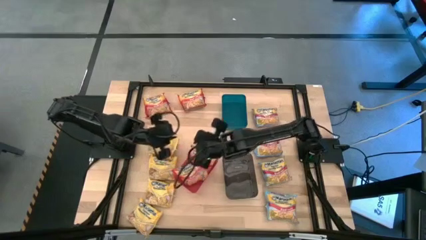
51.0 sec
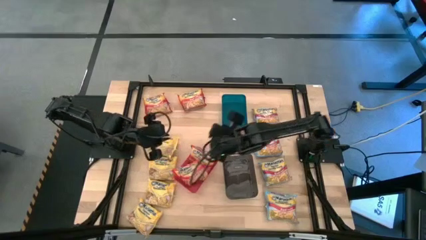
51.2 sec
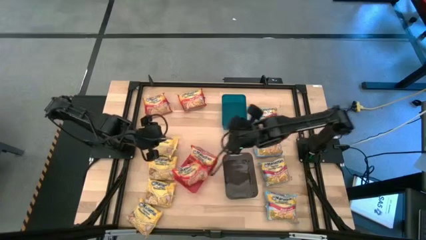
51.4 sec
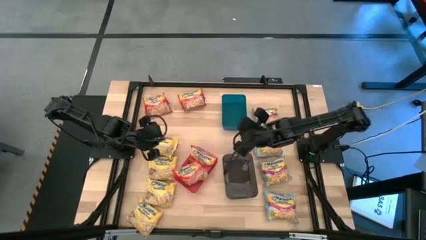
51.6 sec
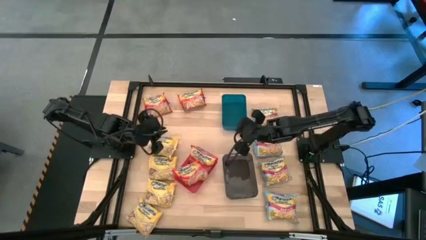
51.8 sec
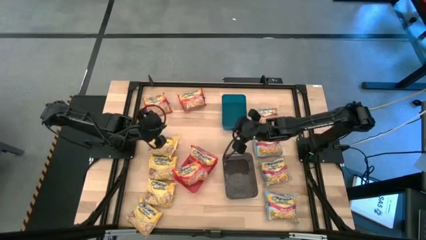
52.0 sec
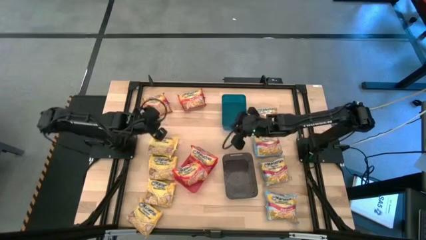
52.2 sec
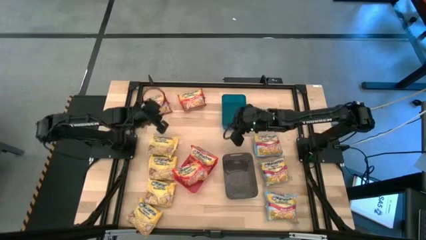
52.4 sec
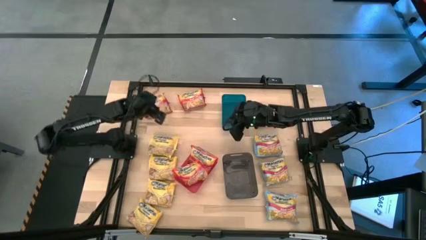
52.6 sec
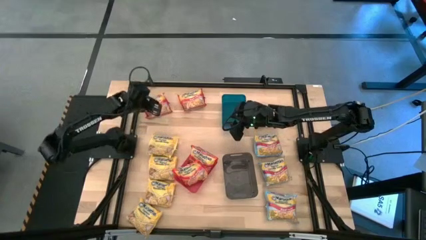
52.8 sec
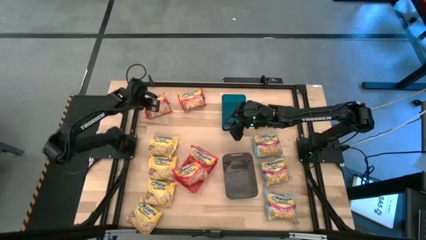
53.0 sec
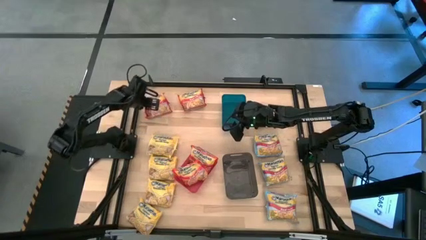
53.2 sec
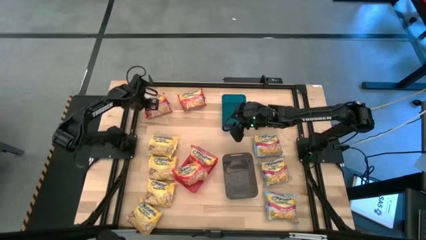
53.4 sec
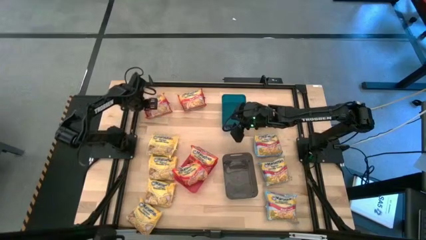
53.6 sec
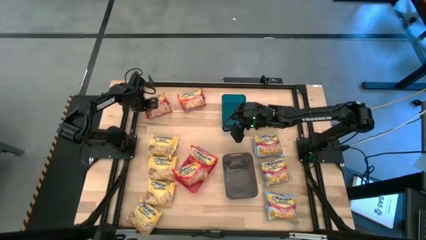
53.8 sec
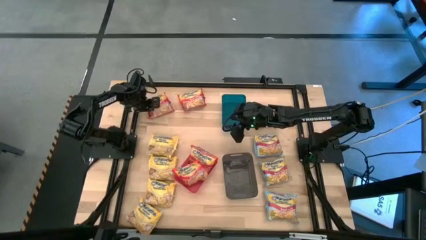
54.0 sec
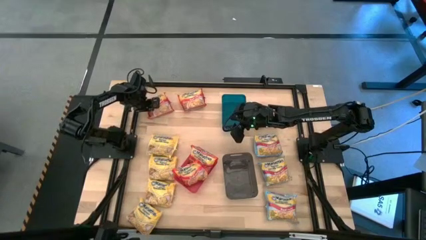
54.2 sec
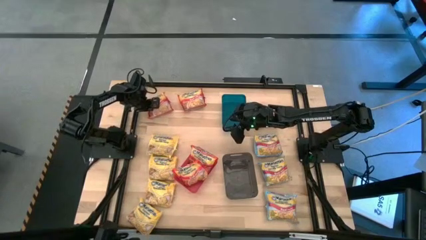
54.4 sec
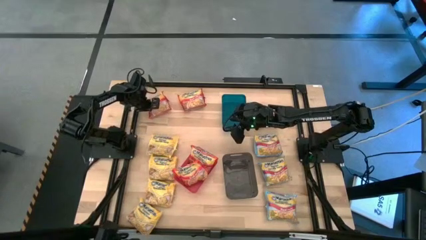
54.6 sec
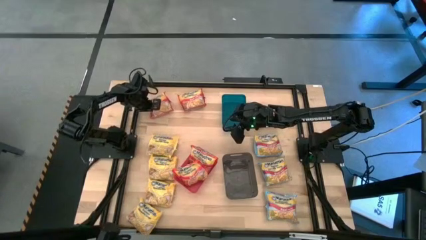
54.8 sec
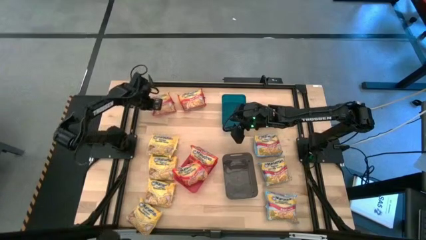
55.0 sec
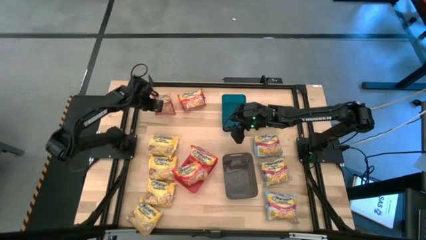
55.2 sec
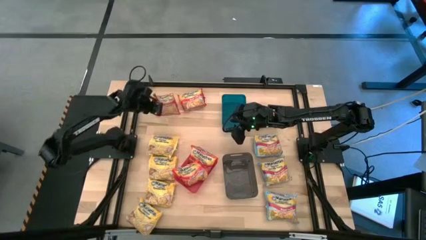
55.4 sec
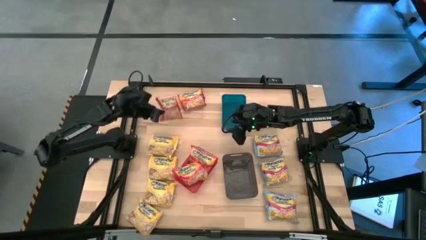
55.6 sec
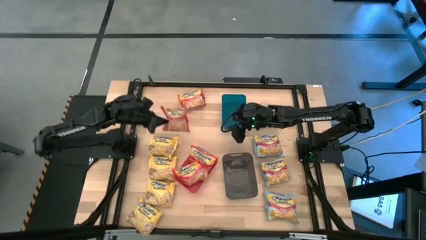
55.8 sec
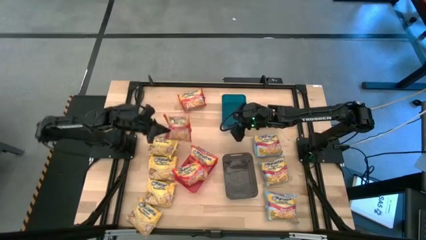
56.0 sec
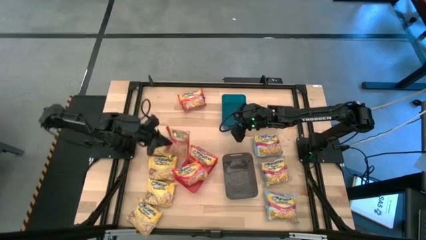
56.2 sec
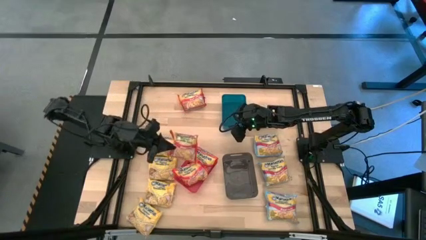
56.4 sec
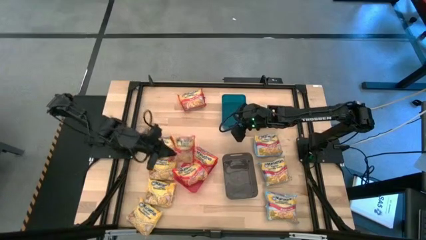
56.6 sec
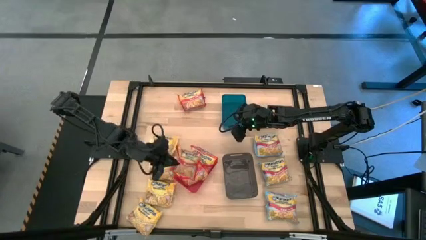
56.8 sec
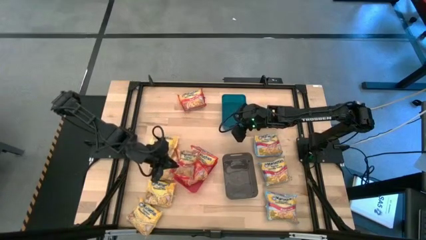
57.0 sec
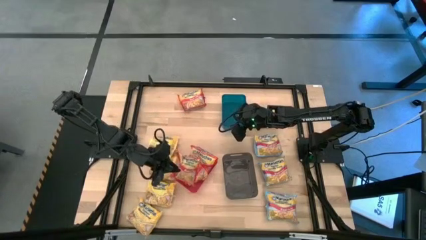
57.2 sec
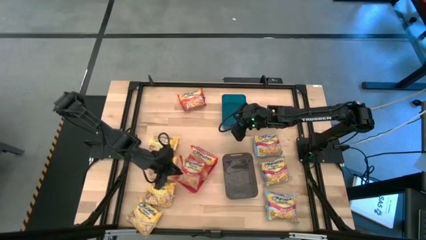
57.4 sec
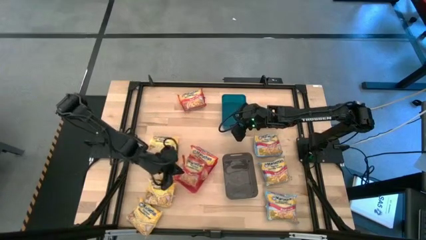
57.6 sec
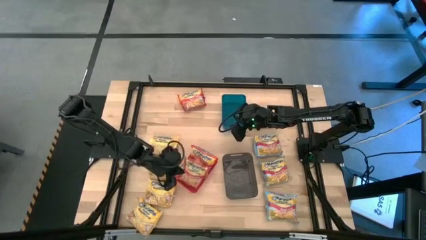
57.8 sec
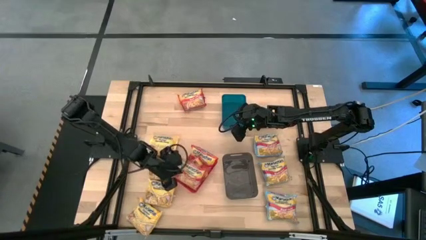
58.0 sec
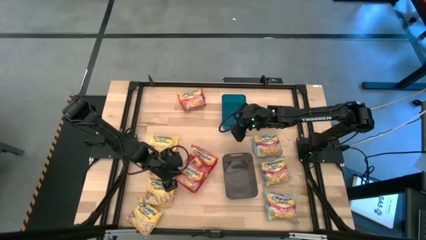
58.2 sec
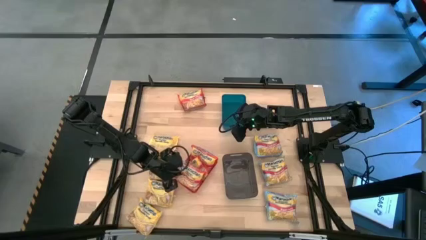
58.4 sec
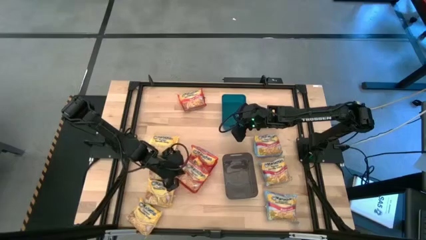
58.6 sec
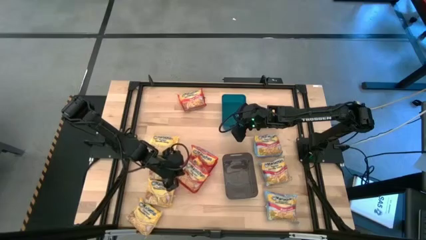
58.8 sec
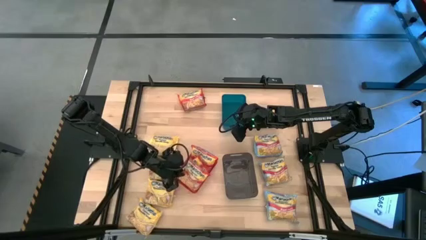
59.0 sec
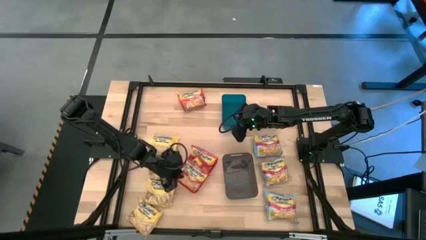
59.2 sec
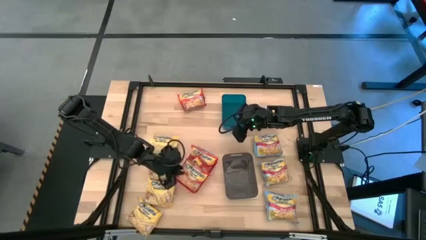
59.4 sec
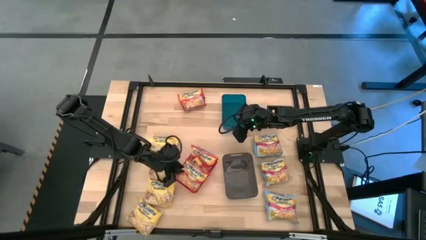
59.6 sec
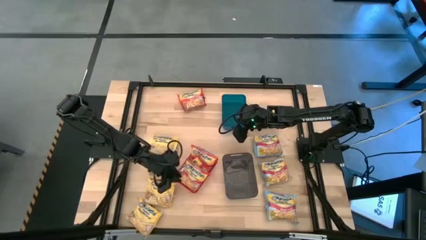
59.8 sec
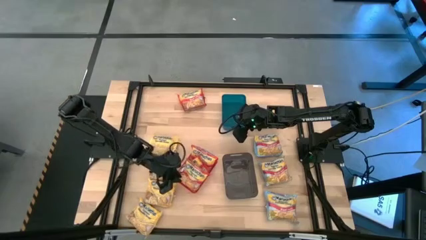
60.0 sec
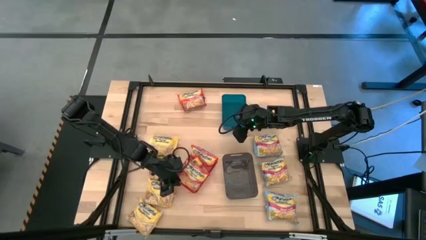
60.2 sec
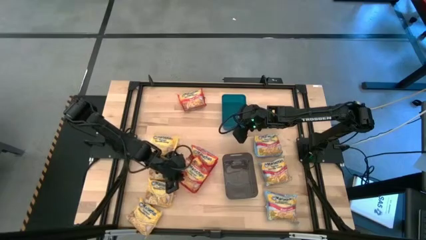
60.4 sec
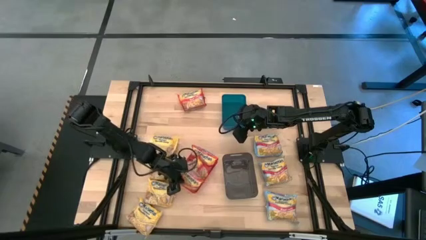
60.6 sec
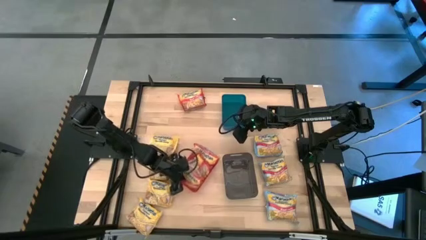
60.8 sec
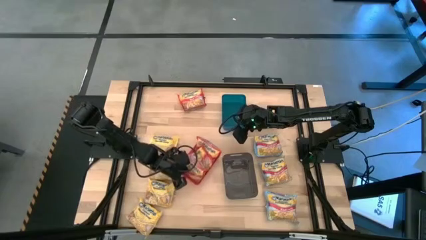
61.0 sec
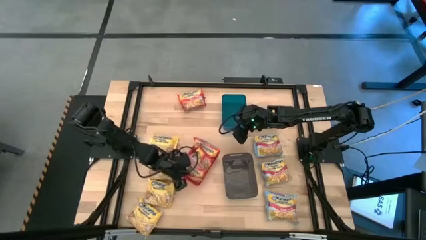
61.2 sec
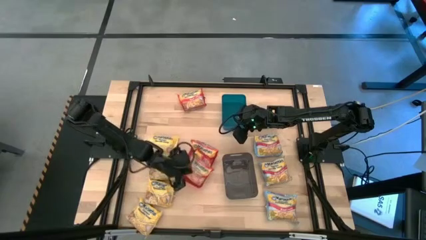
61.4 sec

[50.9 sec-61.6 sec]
Task: Sort Maruchan noodles
Put the red bag into the red bin

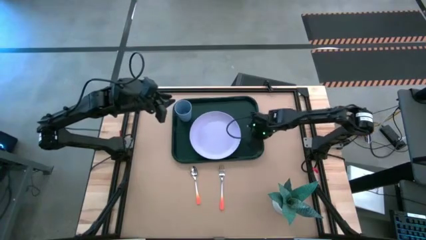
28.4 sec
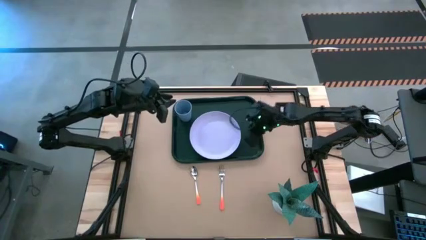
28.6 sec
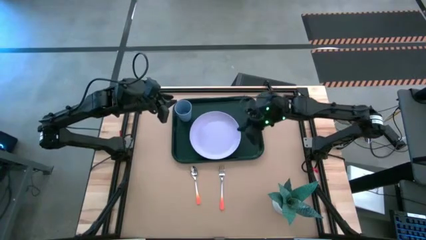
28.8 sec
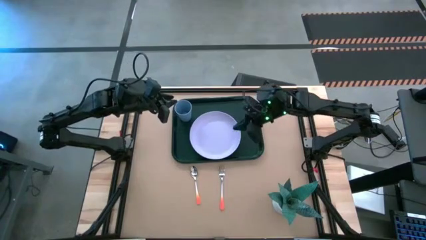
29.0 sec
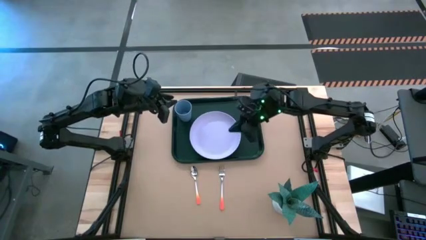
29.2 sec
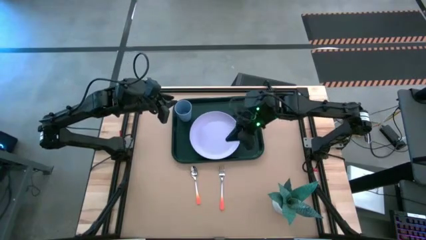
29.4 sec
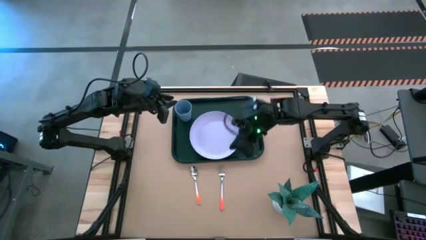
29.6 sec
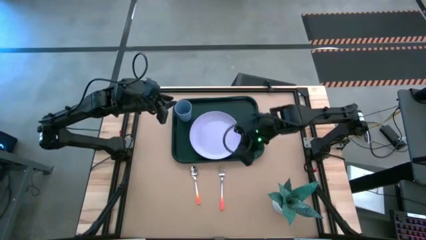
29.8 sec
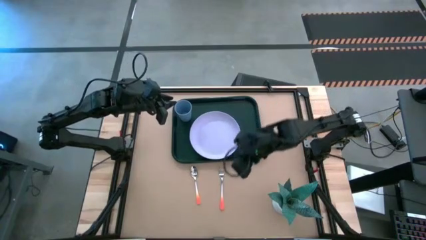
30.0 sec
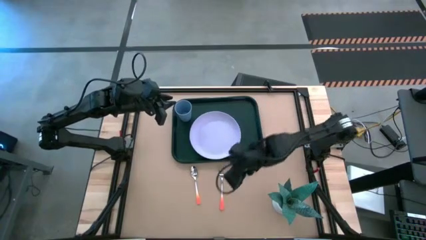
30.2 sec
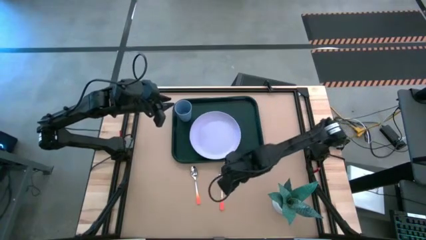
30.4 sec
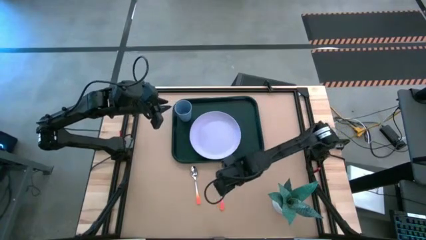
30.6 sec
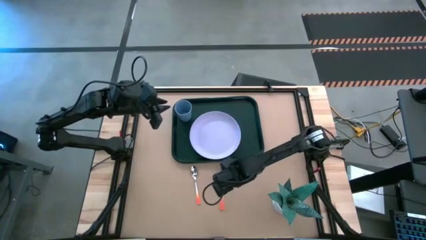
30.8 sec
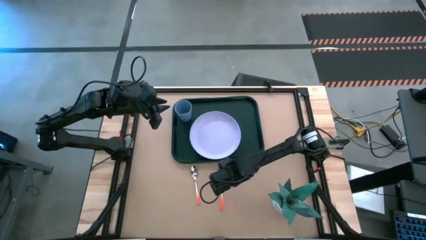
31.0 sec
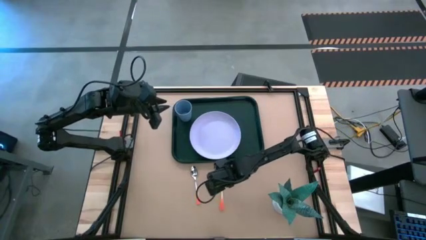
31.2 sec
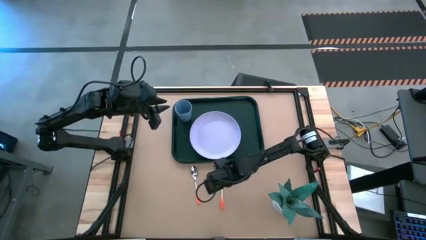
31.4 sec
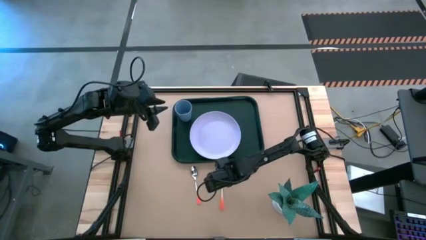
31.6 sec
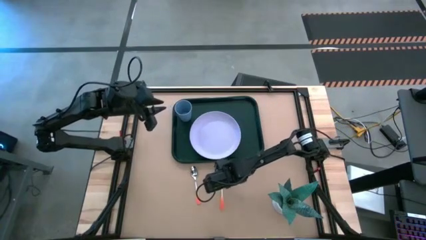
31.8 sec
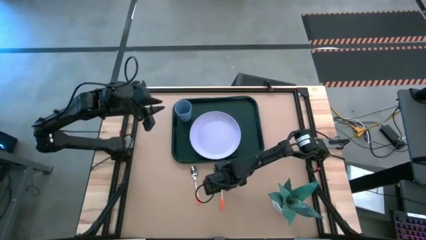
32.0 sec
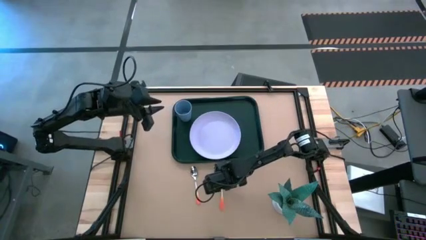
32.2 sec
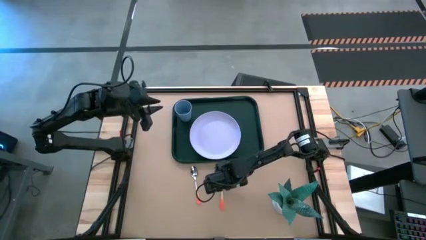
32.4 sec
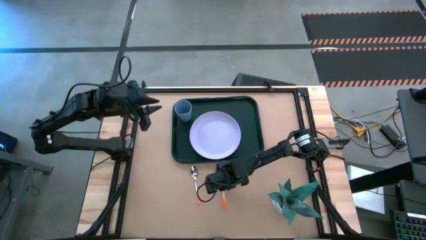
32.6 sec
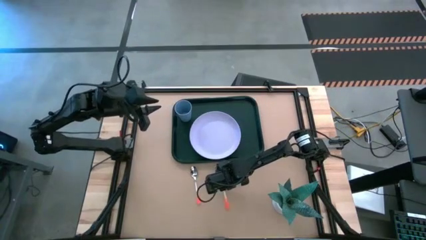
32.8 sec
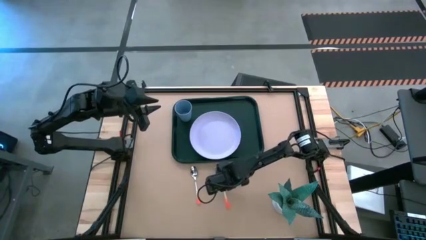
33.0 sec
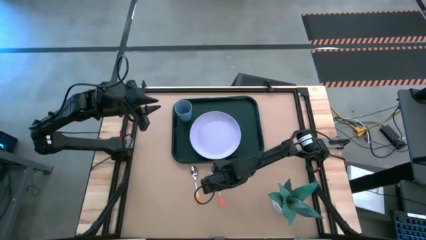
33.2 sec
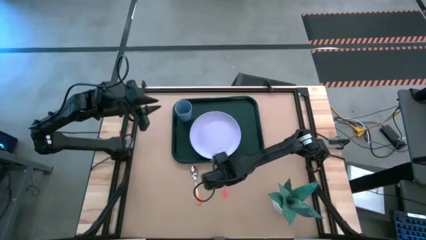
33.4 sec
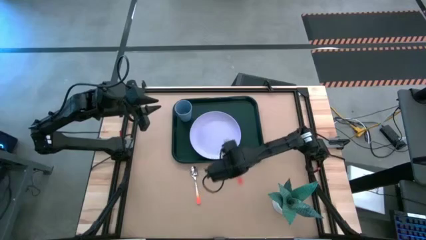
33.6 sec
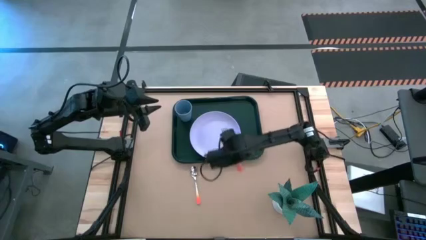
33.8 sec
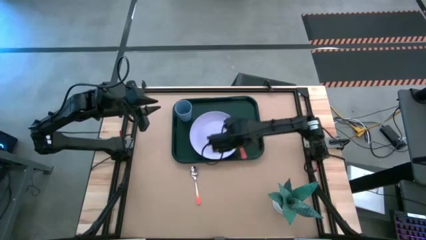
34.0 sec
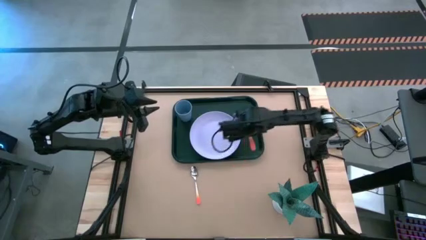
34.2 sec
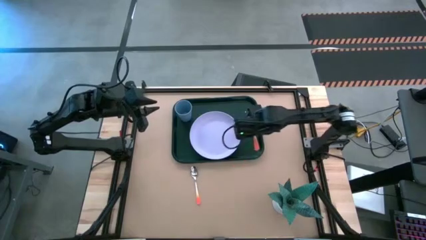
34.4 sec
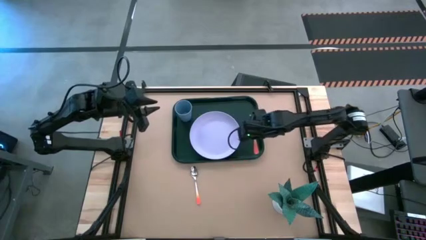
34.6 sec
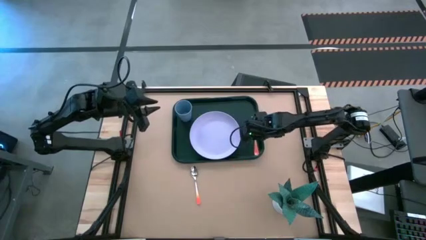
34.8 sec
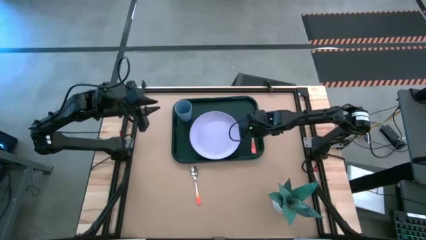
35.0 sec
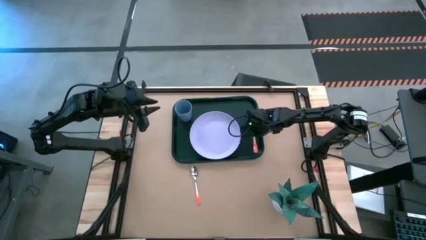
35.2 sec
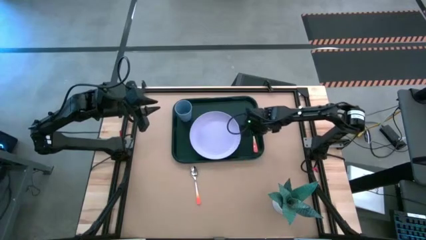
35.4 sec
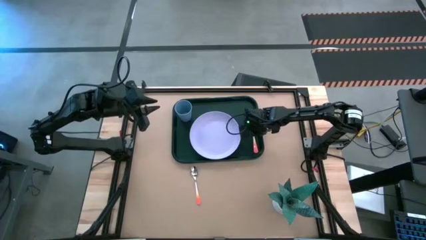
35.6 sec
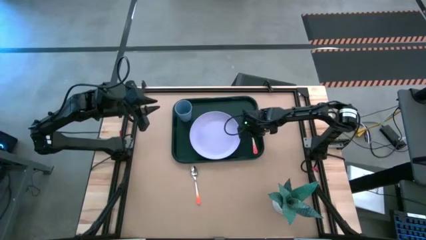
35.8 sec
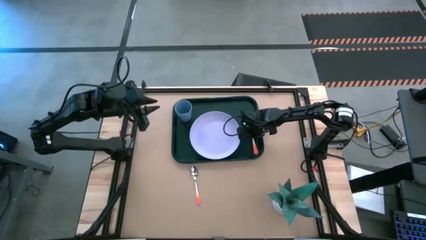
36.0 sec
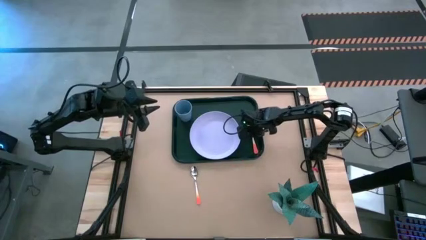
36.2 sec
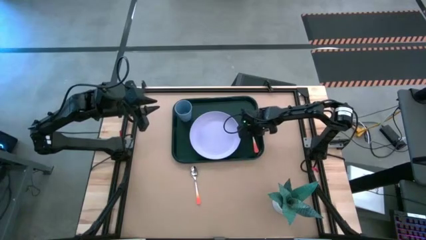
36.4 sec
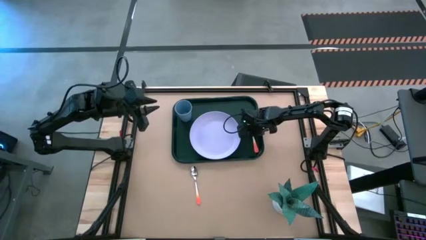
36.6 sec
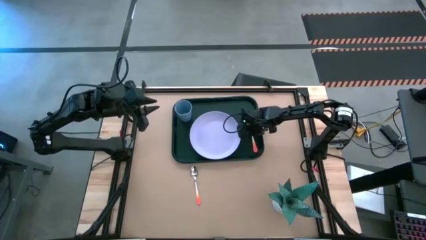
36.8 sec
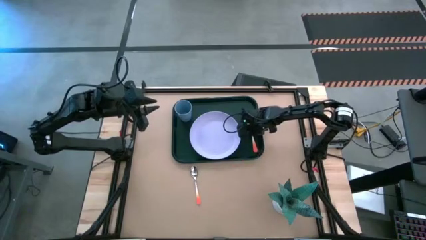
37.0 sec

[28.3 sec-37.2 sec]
Task: Pick and place plate/cup/fork/spoon on tray
Put the orange fork on the black serving tray to the right of the white plate
